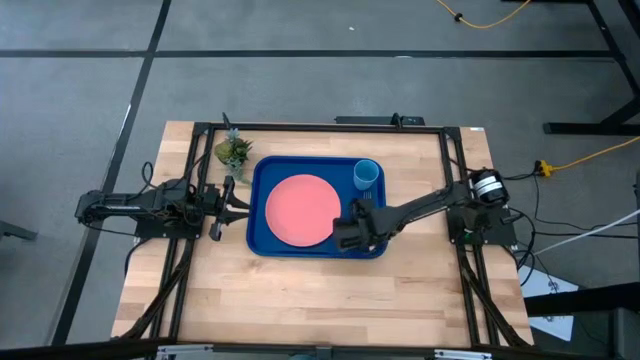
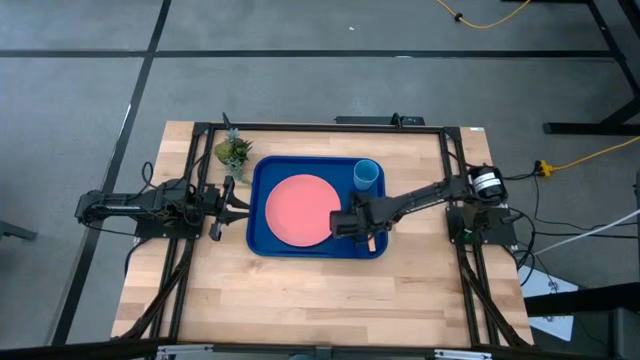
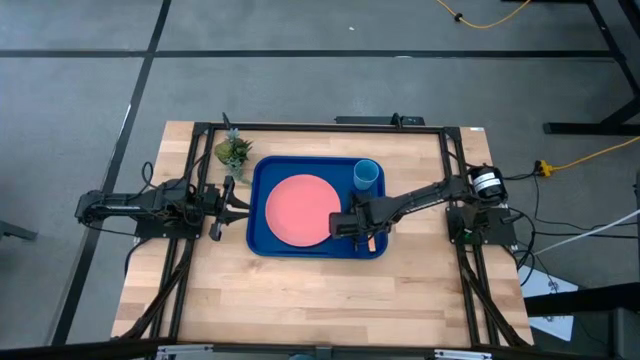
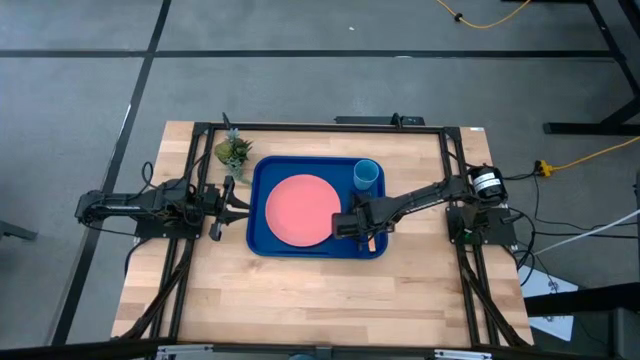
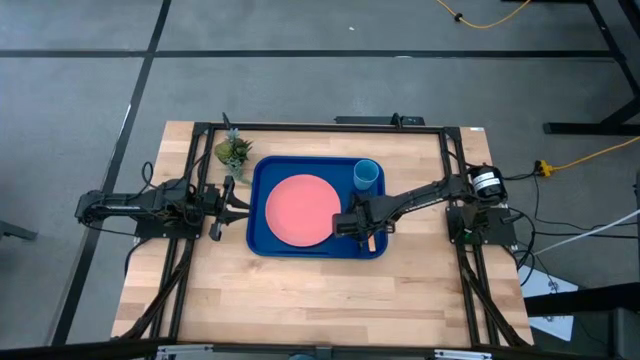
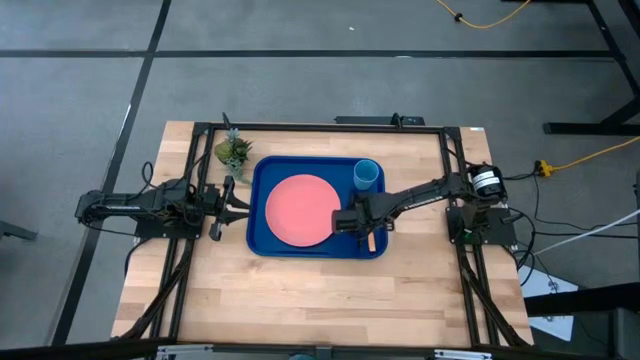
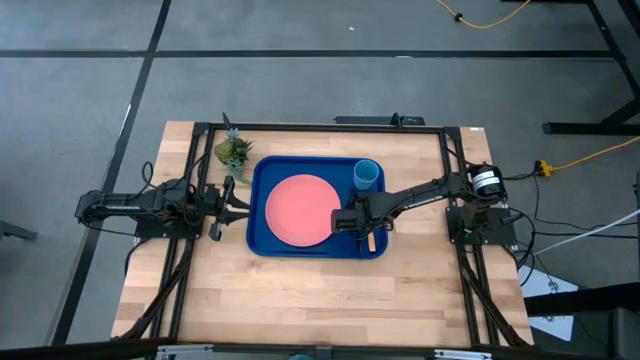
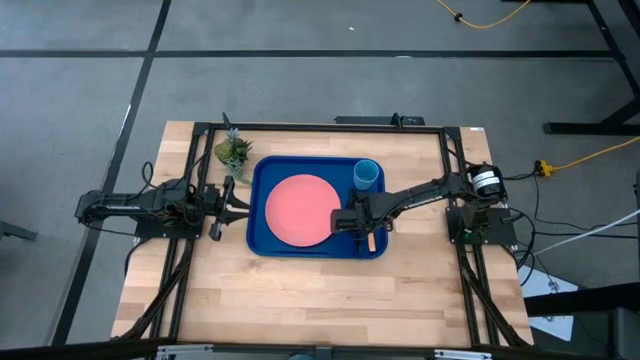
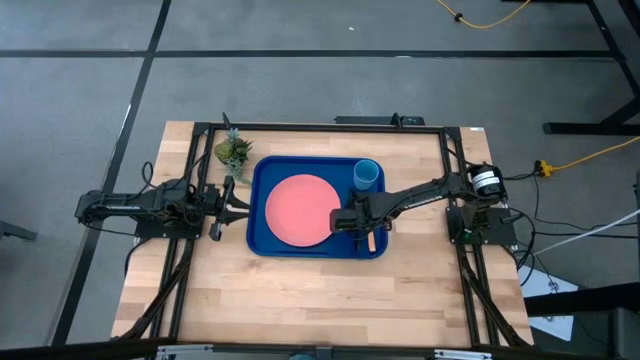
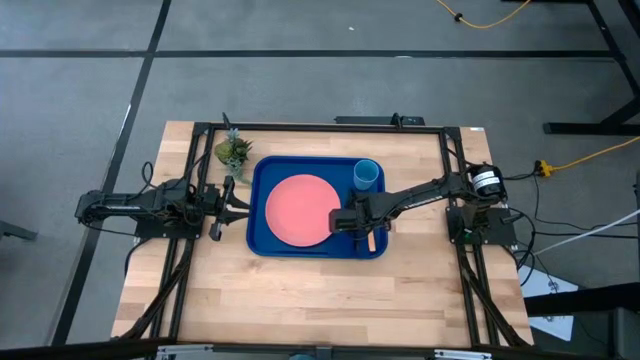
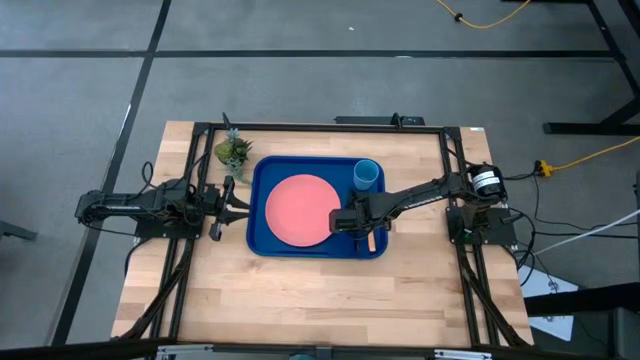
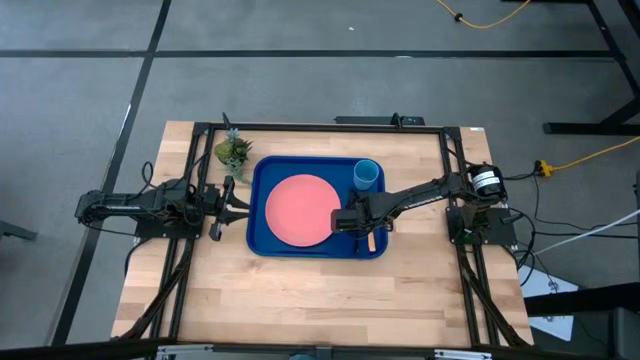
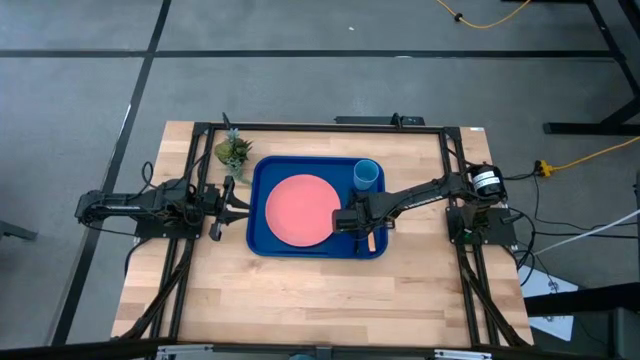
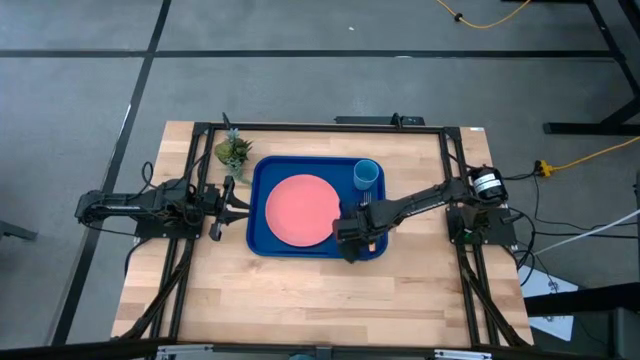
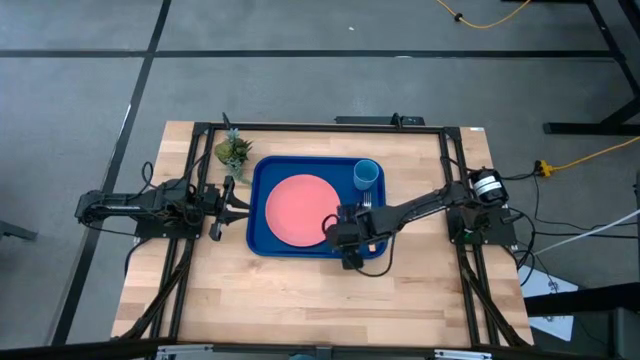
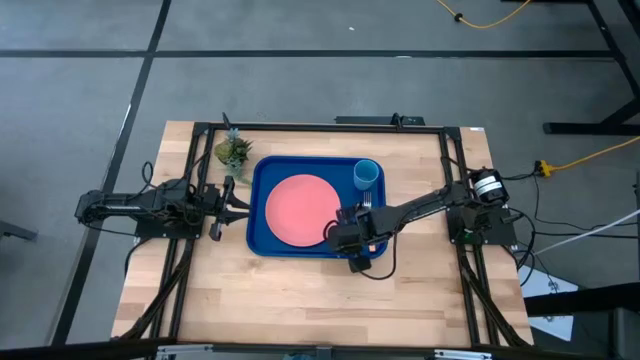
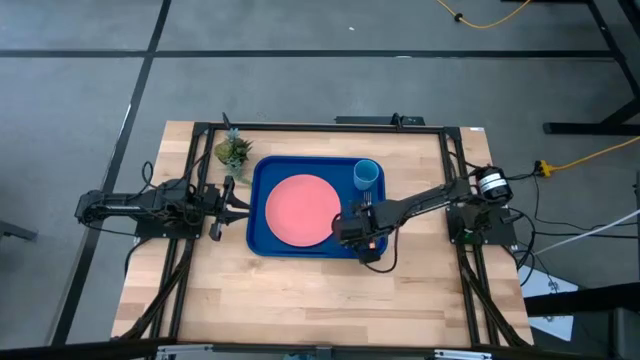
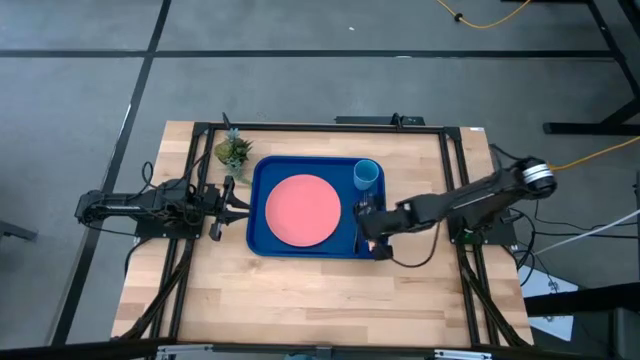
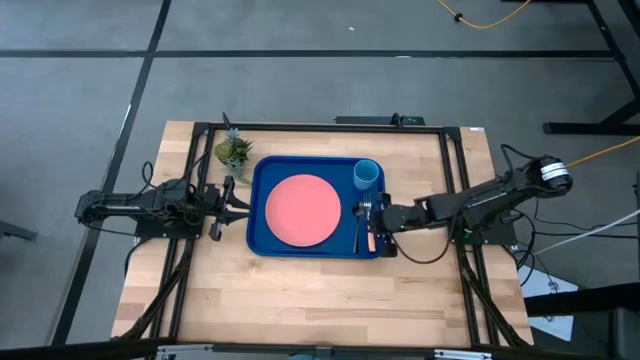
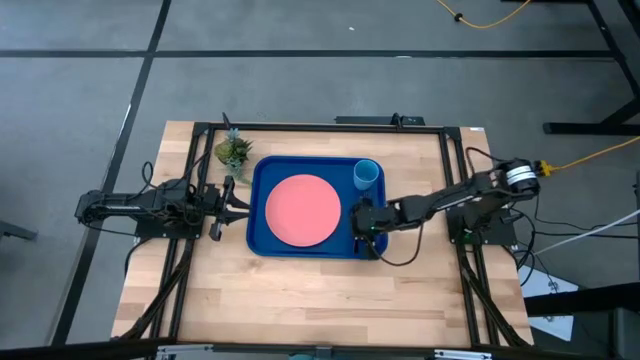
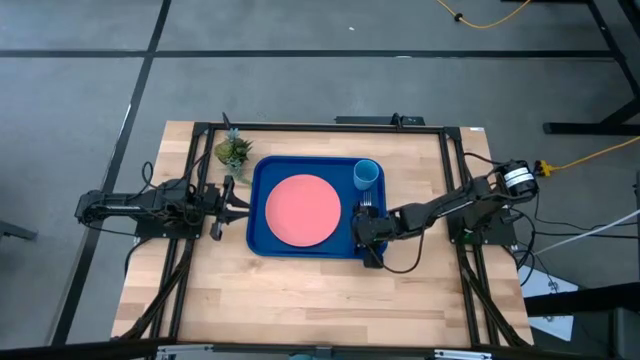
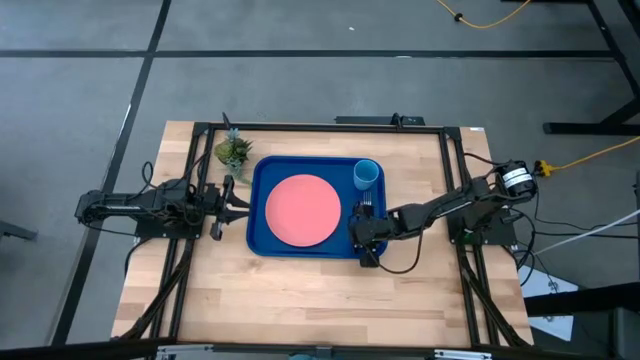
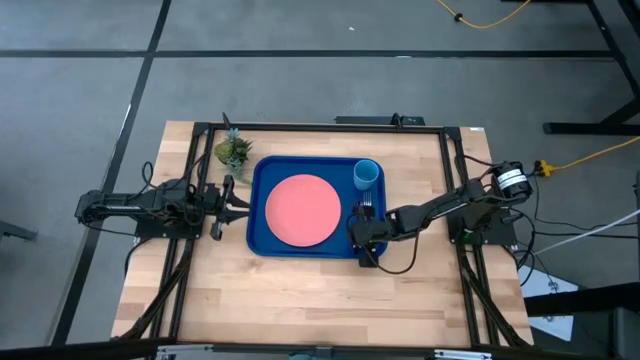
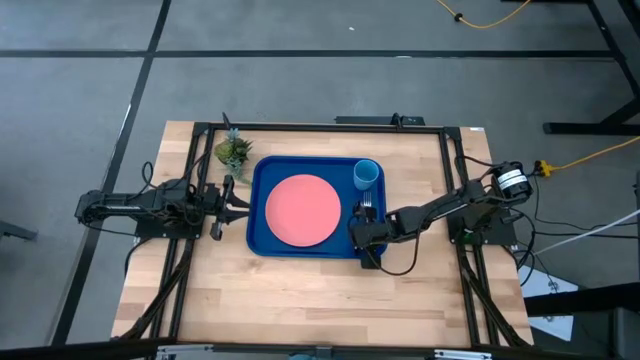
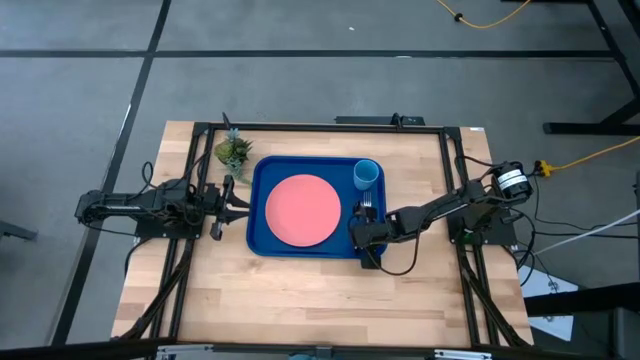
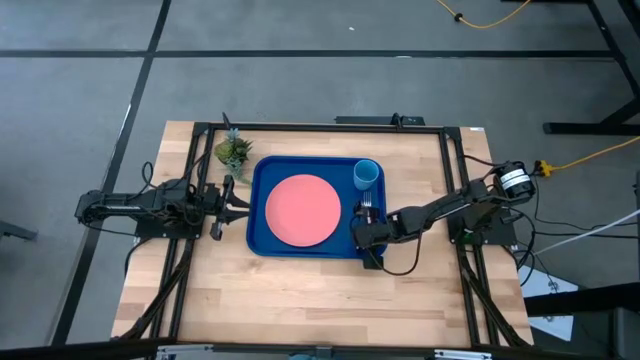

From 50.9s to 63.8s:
Task: Pick and place plate/cup/fork/spoon on tray
Put the black spoon on the left side of the brown fork on the blue tray

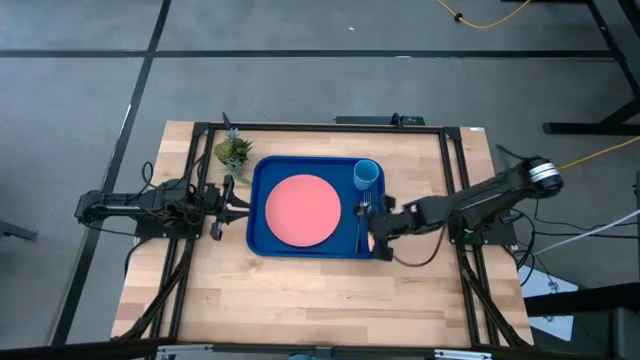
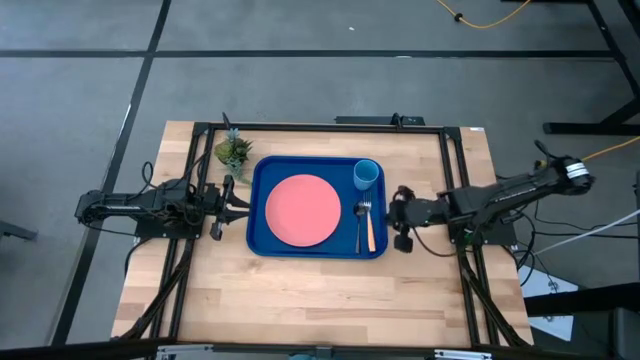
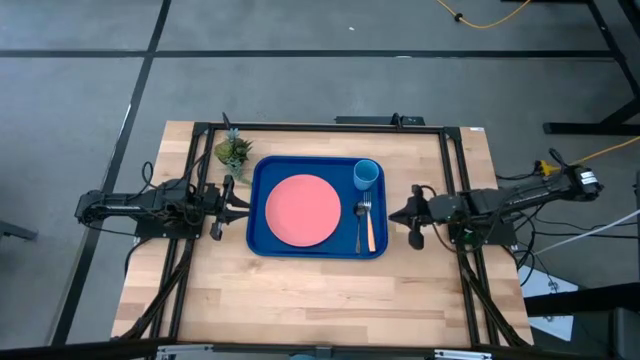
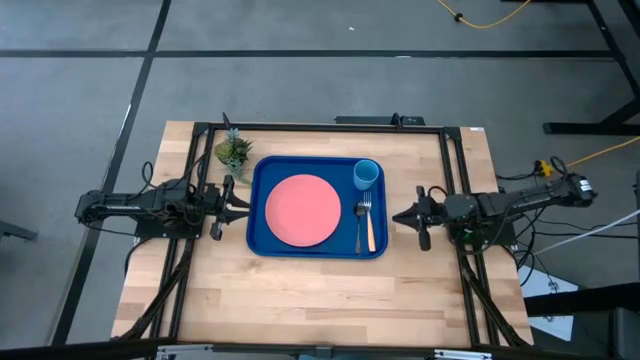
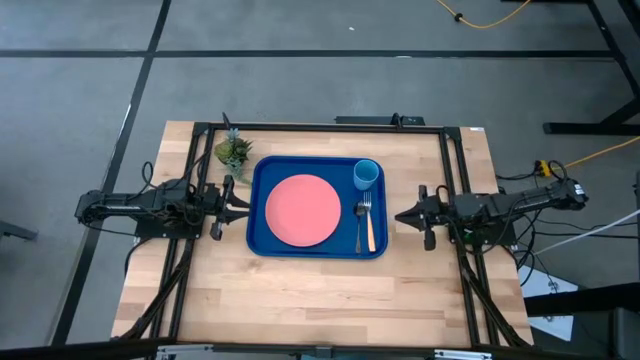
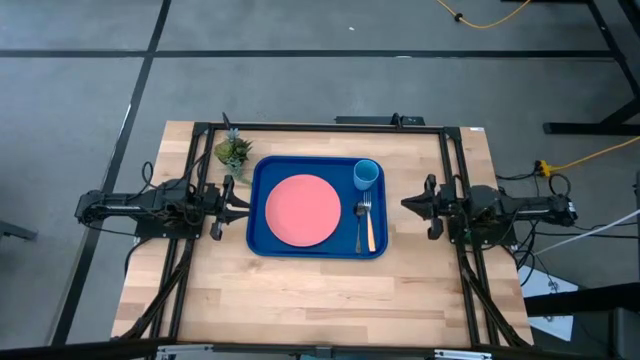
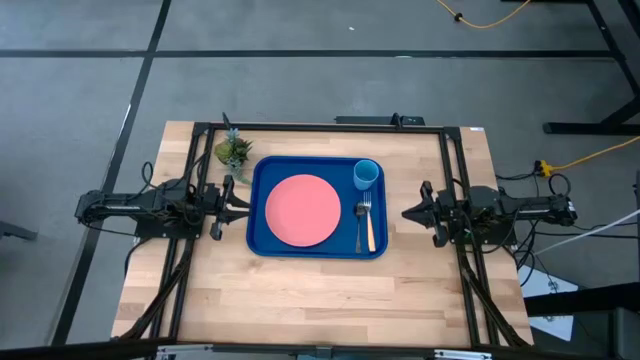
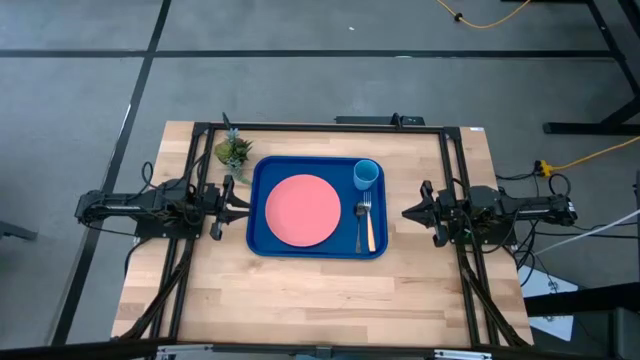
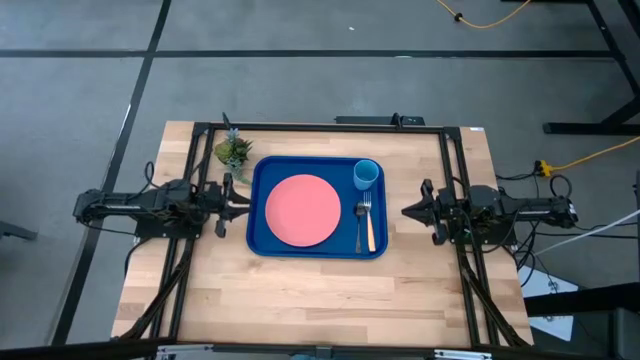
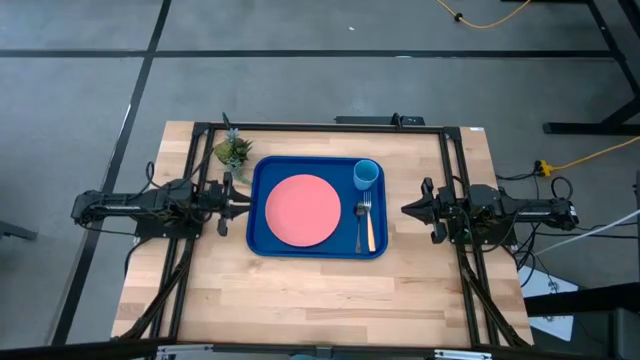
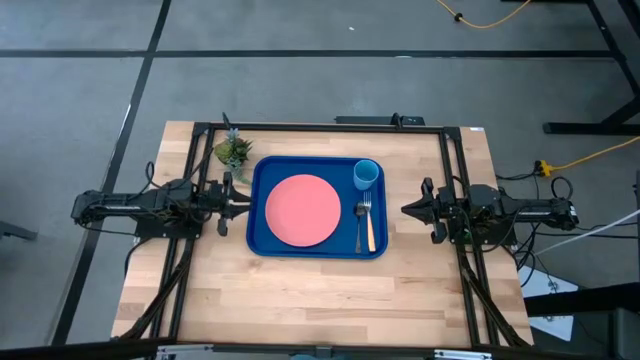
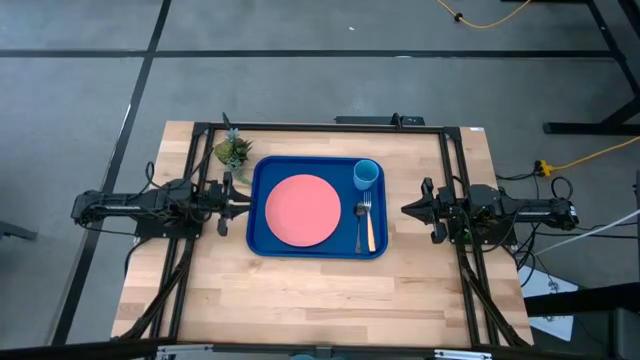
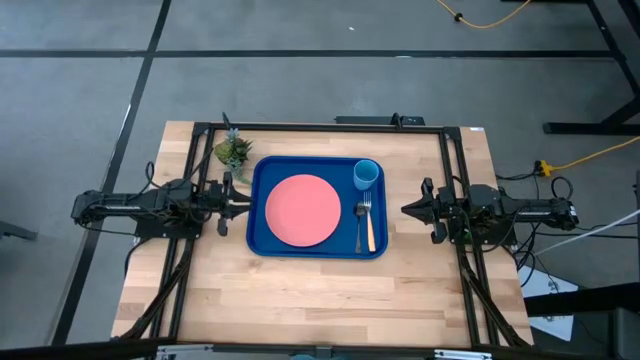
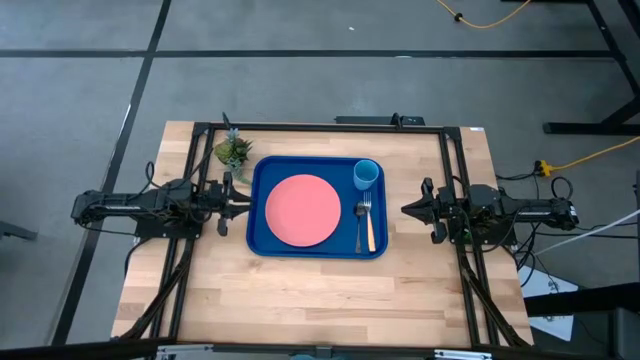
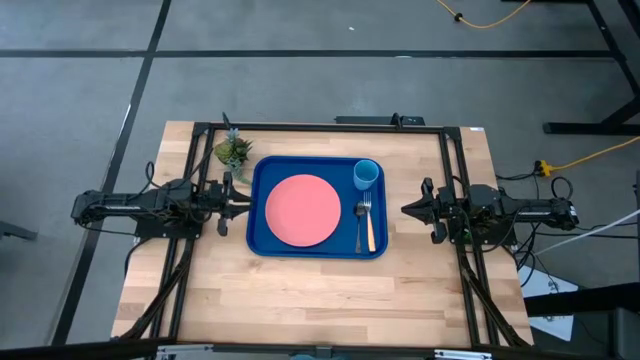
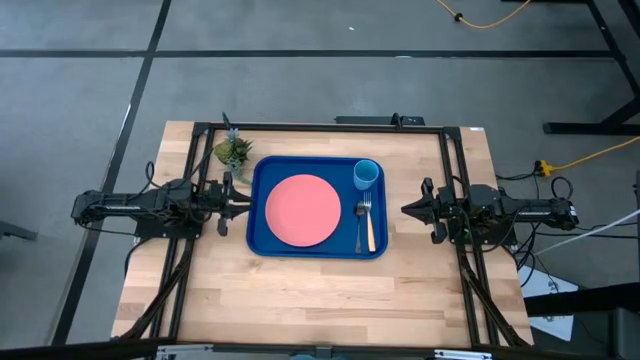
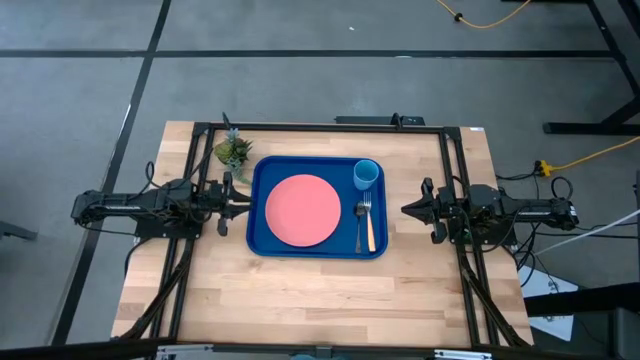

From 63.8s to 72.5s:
Return to Home Position
